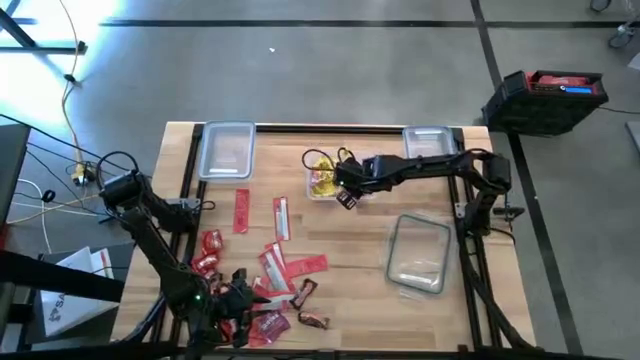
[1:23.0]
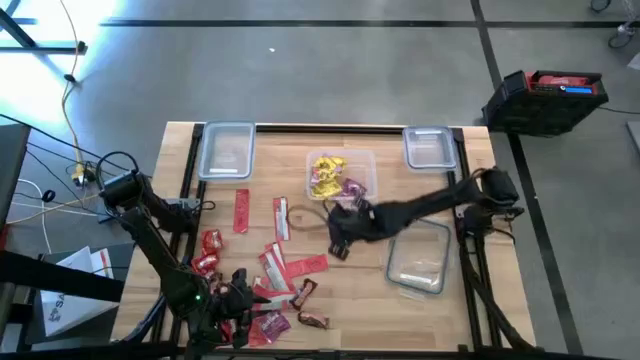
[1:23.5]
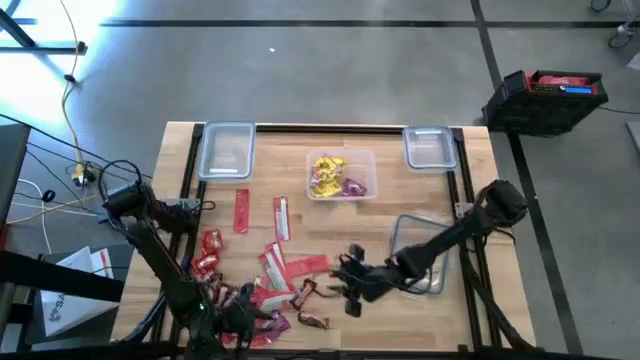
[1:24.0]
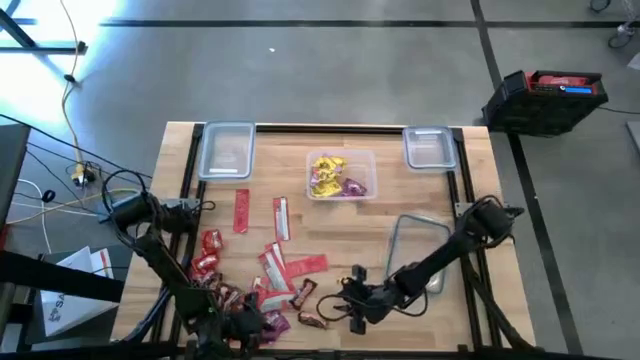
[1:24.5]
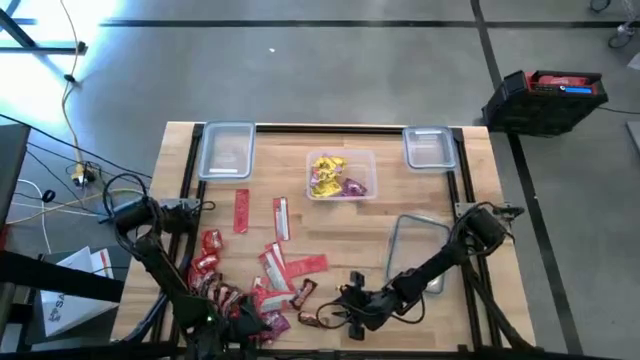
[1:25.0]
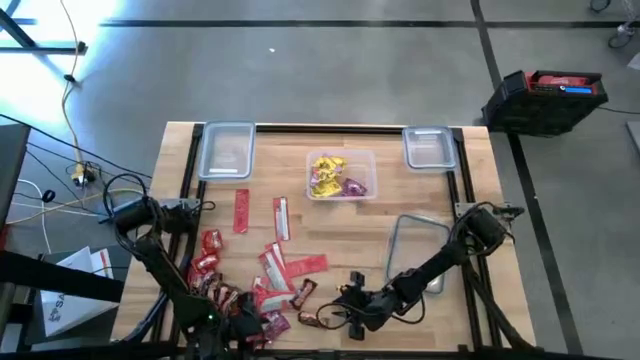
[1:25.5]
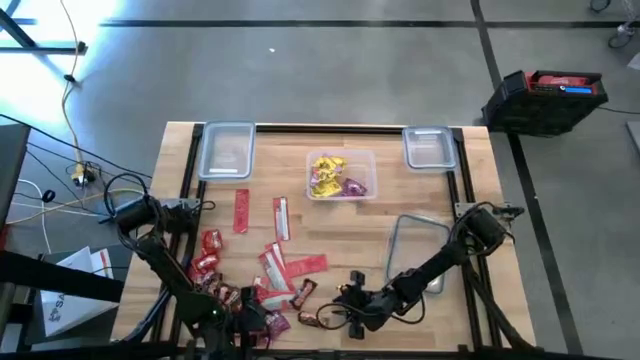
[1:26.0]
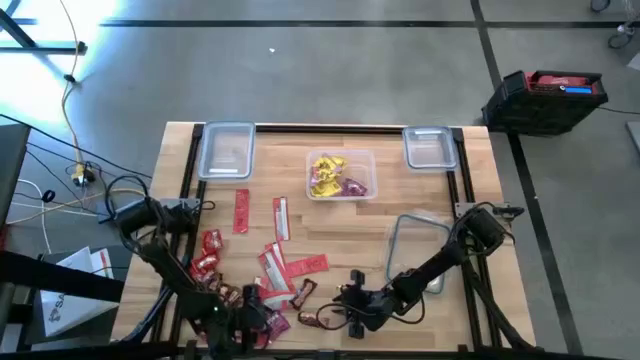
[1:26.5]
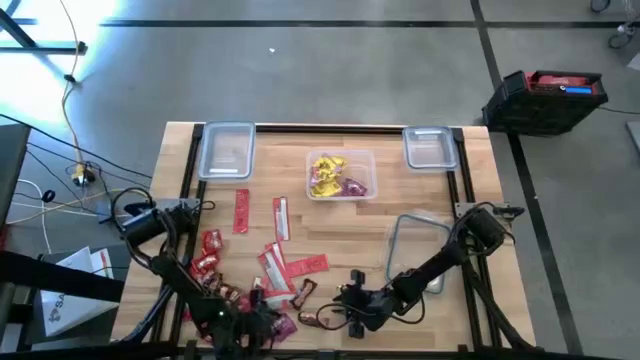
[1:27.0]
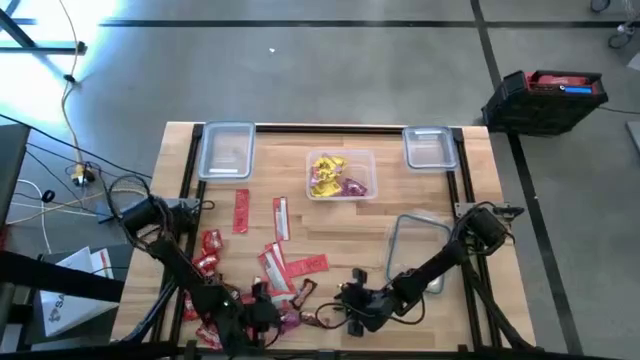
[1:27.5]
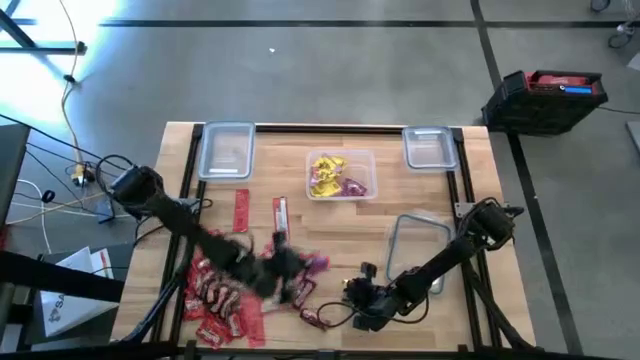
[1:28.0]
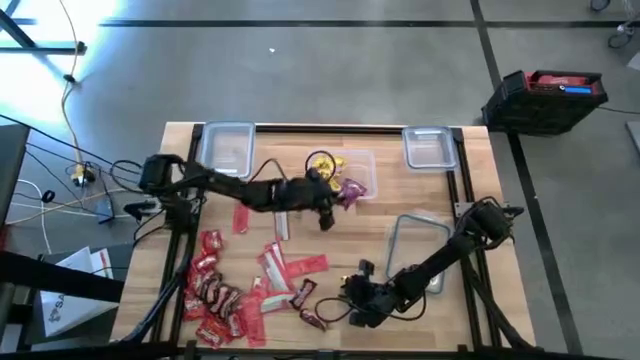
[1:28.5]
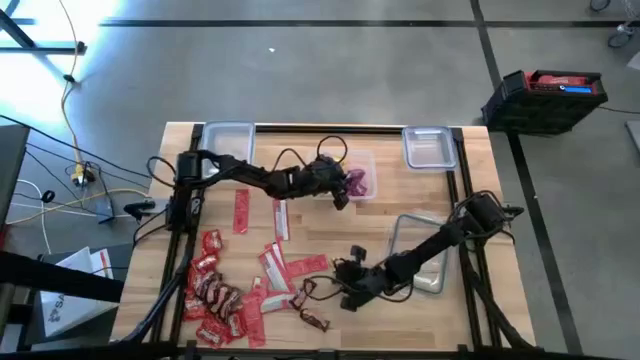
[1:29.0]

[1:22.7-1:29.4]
Task: Sort candy
Put the violet candy into the center transparent bin

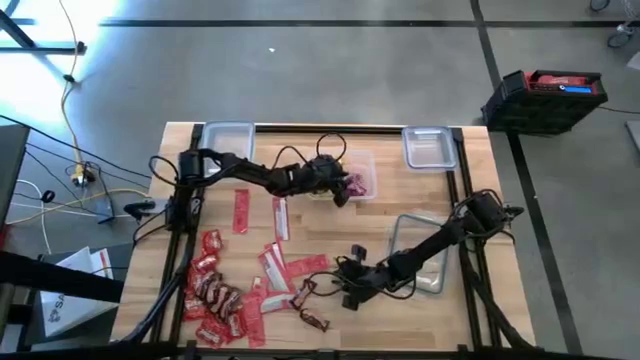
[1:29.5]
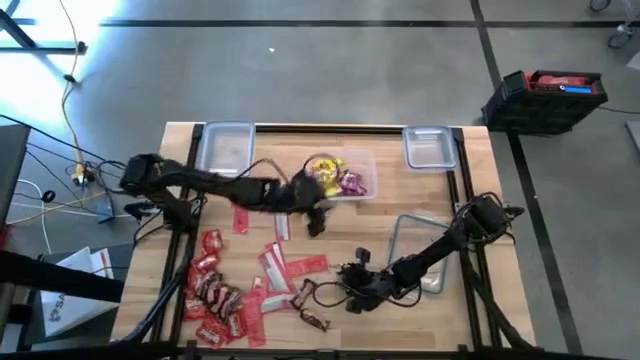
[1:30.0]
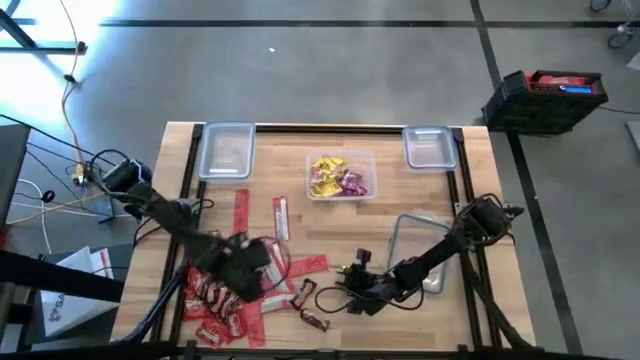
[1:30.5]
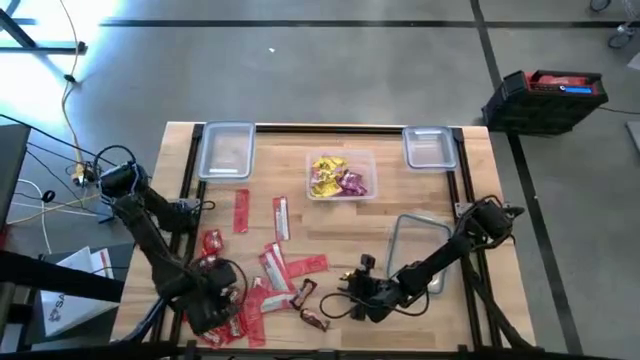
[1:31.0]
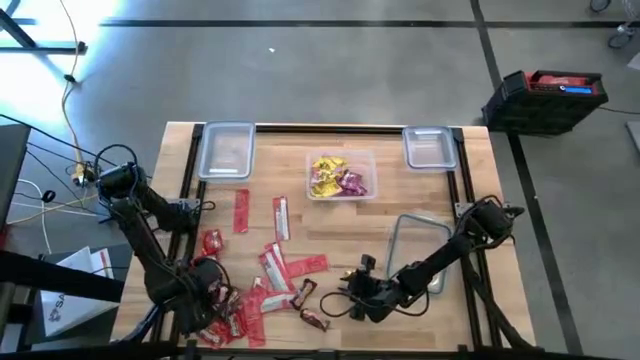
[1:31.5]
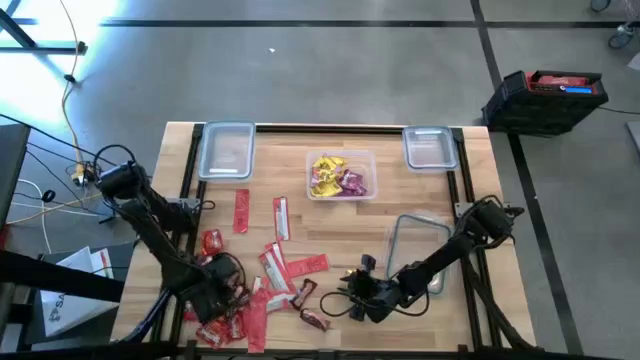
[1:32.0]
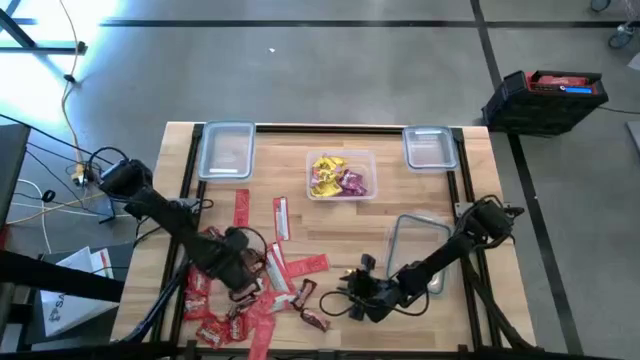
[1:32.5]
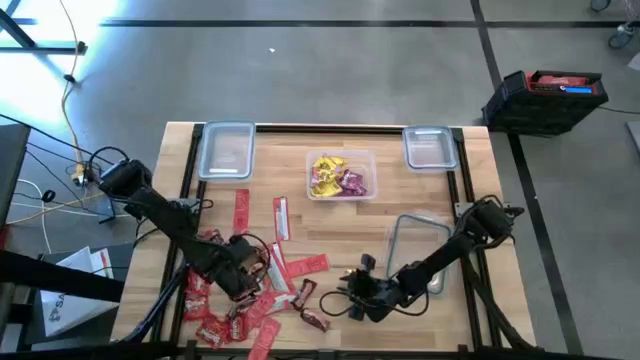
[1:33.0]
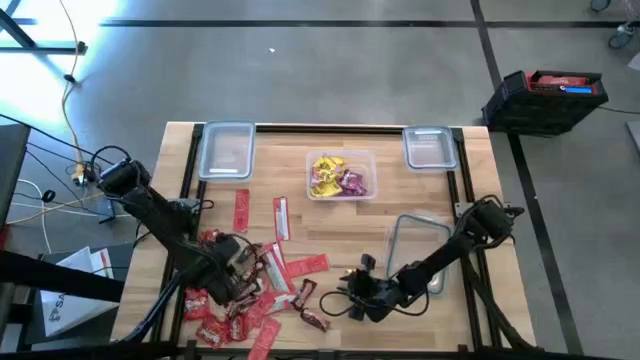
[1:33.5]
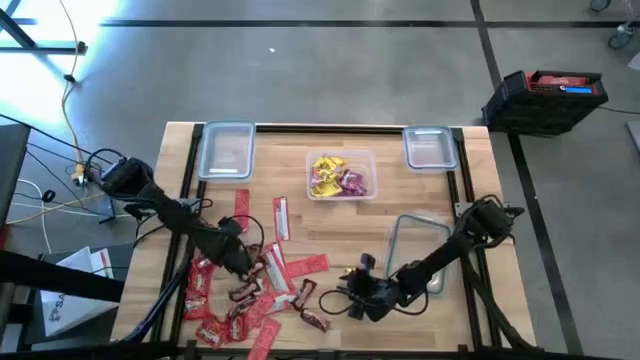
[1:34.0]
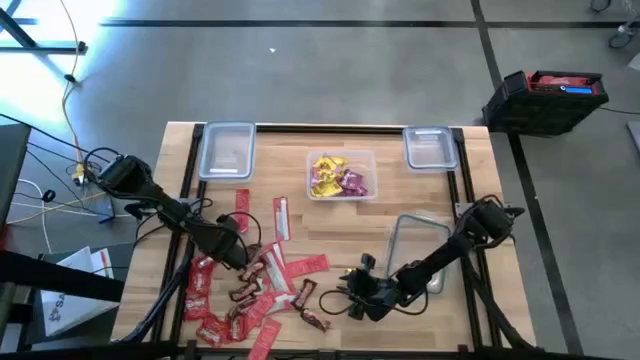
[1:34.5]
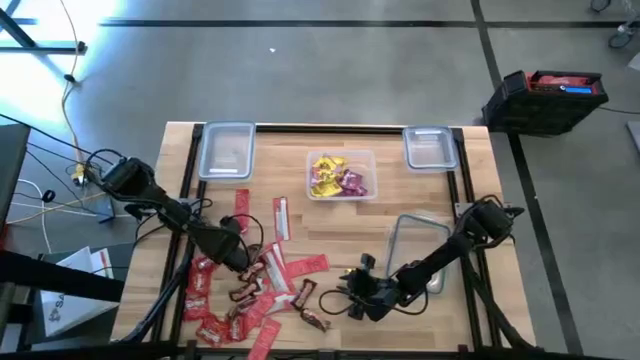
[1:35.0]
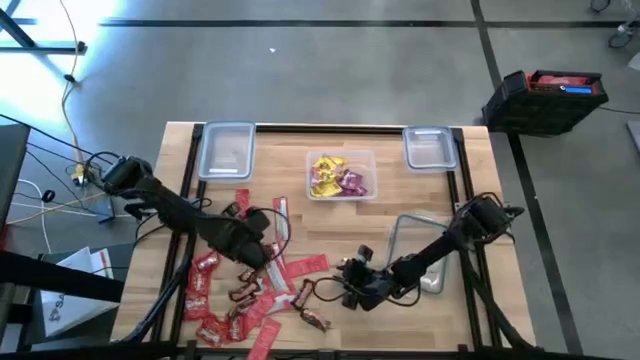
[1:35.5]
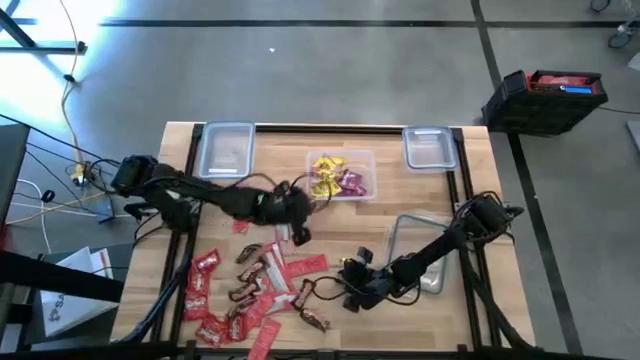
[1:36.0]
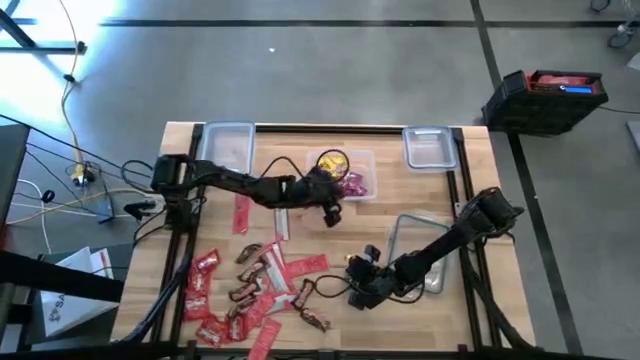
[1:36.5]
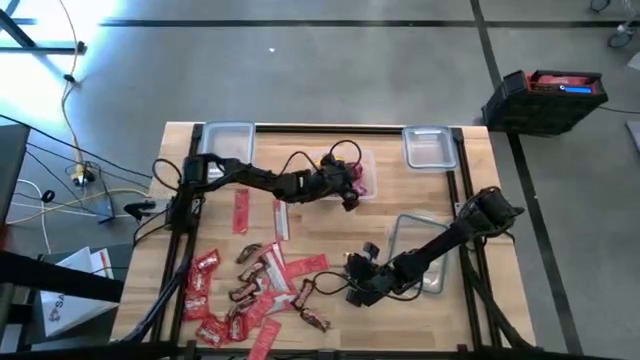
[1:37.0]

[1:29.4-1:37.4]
Put the red candy into the center transparent bin

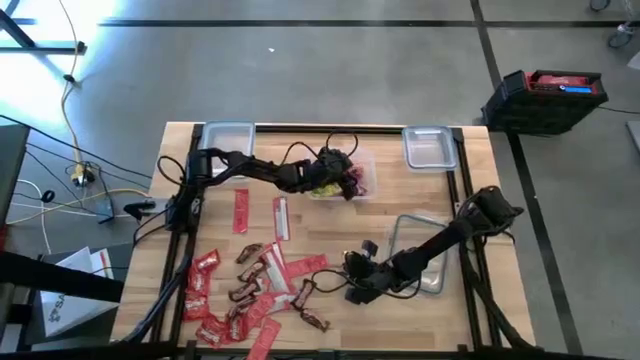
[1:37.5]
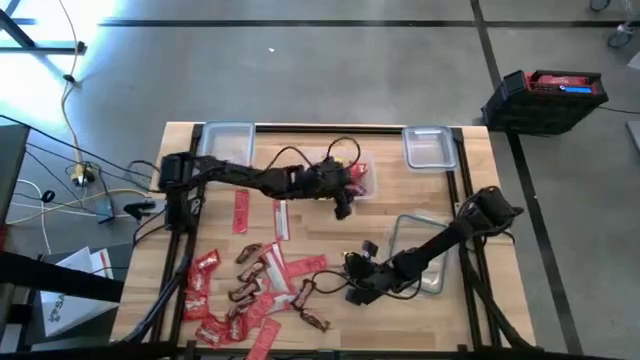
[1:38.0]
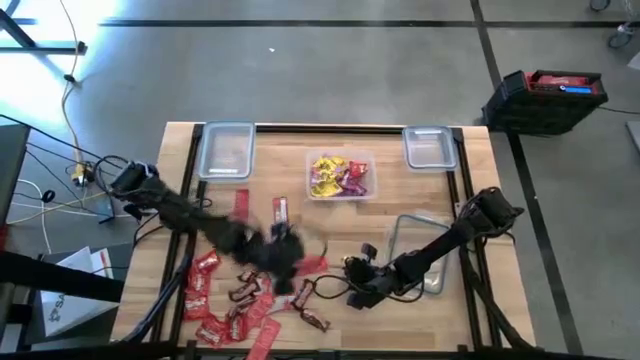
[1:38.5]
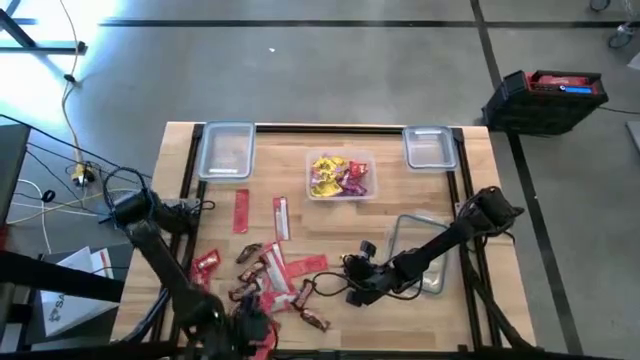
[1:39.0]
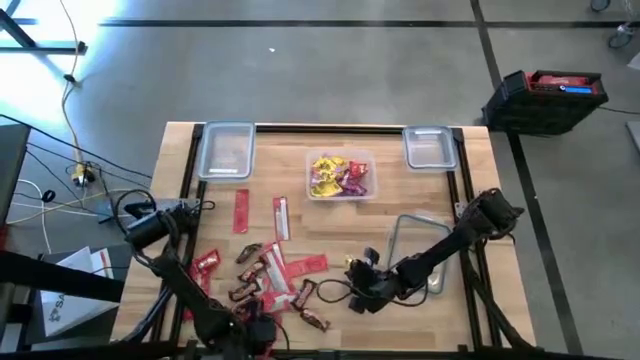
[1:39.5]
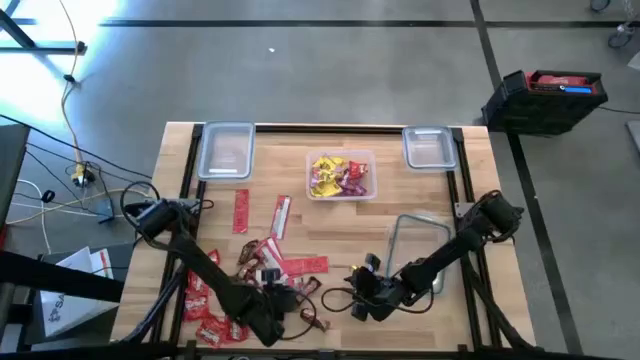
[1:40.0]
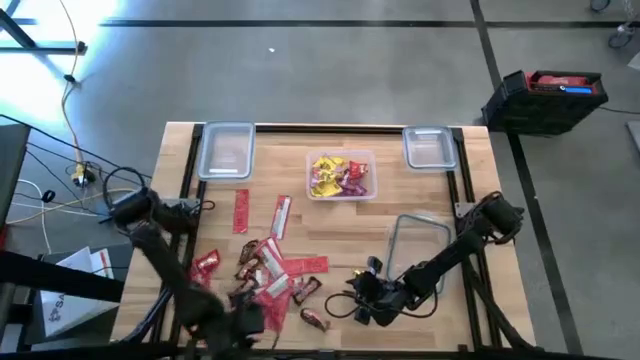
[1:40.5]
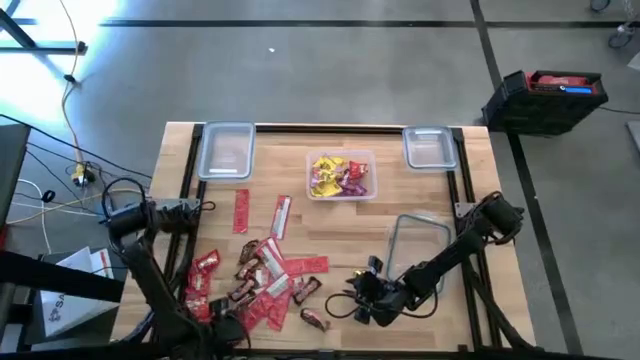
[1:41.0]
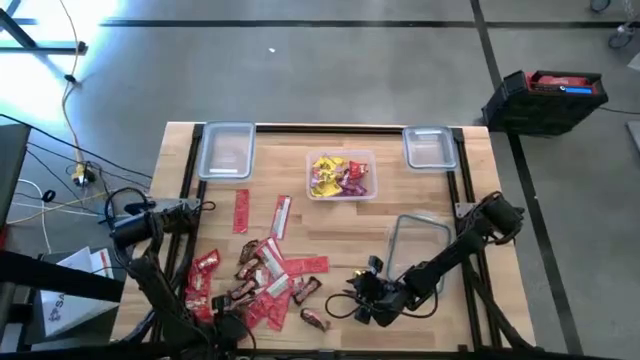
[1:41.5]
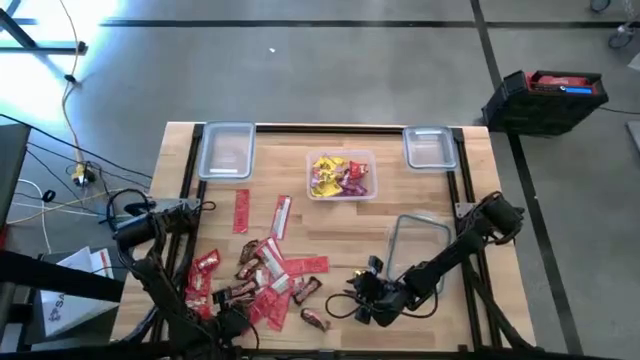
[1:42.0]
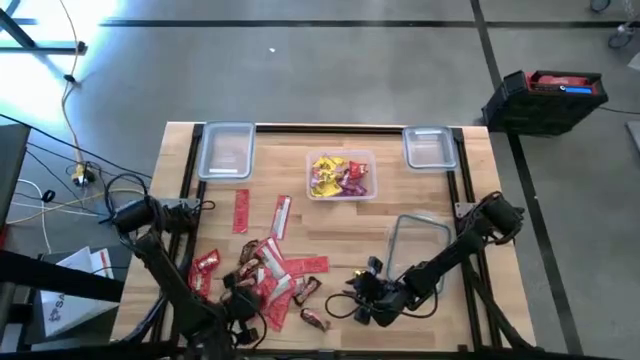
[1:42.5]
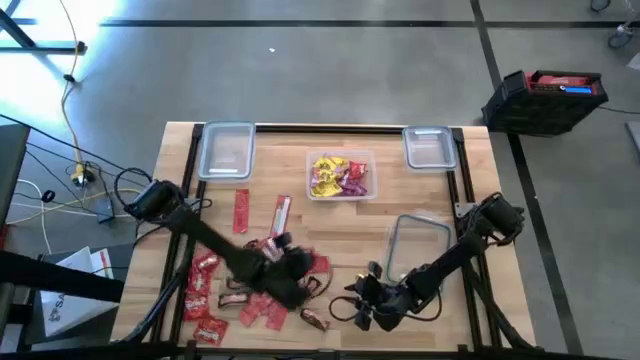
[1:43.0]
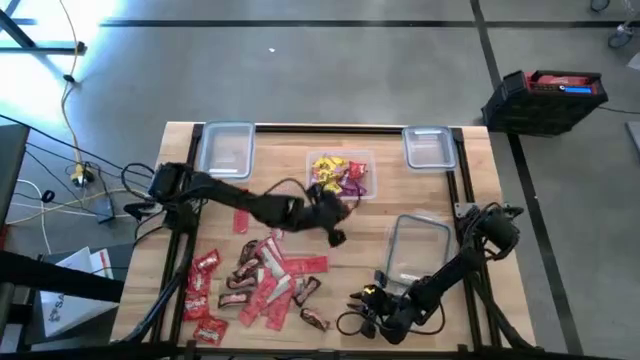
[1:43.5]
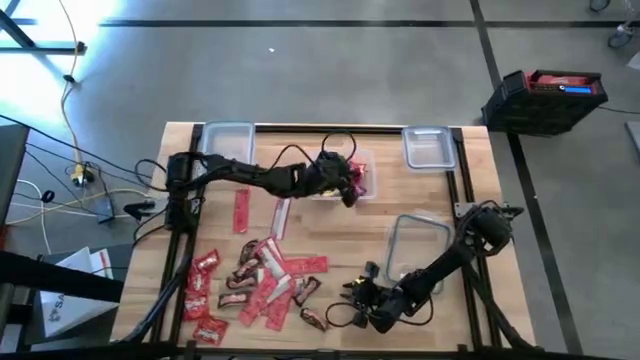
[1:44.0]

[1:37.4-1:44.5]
Put the red candy into the center transparent bin

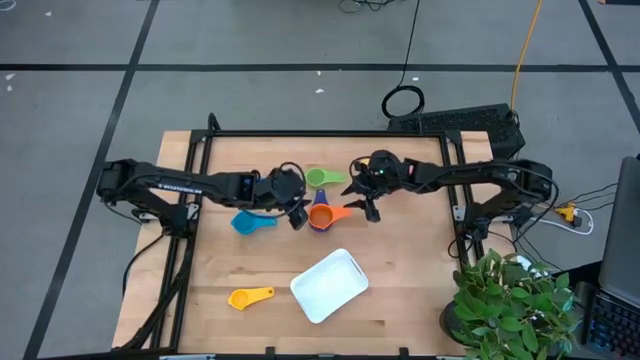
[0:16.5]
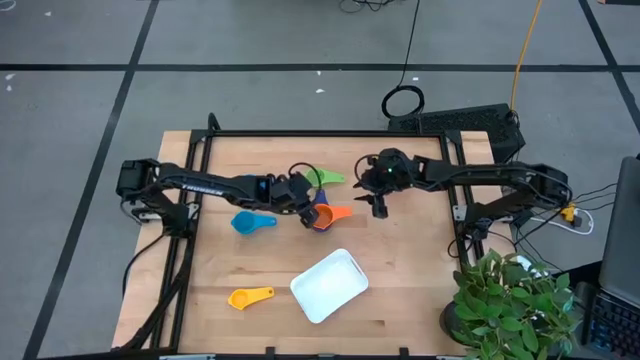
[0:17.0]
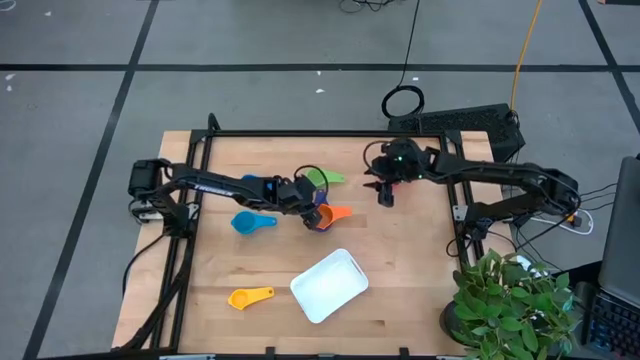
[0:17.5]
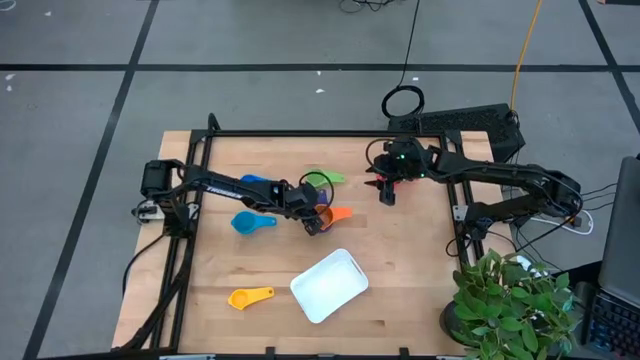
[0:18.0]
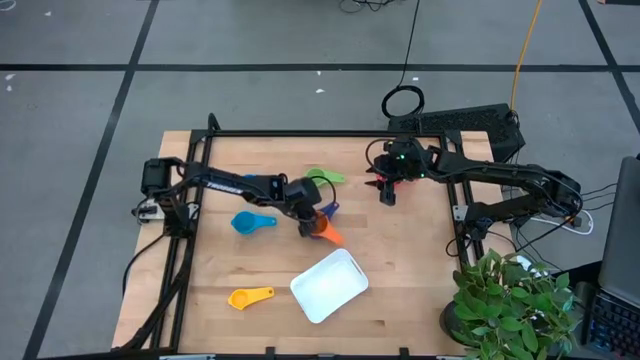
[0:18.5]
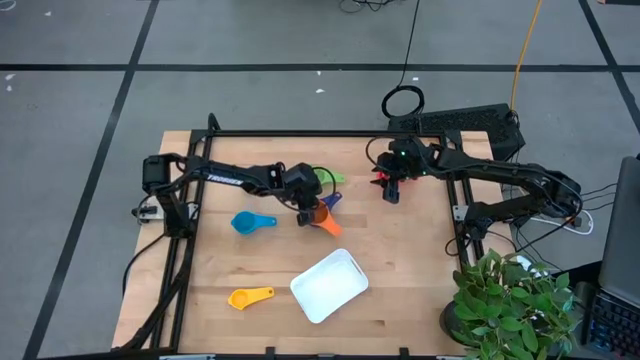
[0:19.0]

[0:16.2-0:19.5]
Task: Nest measuring cups in basket
Adjust the nested measuring cups
